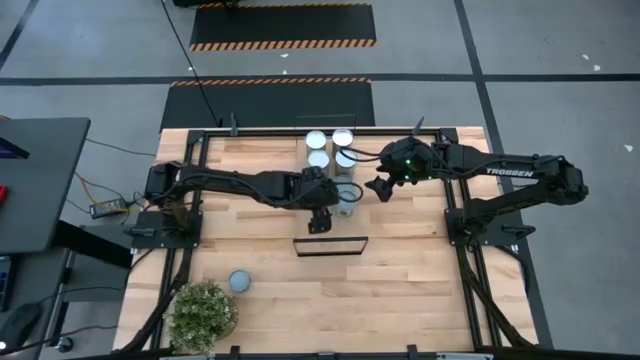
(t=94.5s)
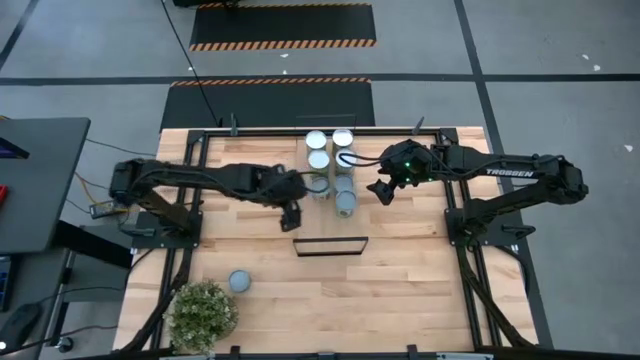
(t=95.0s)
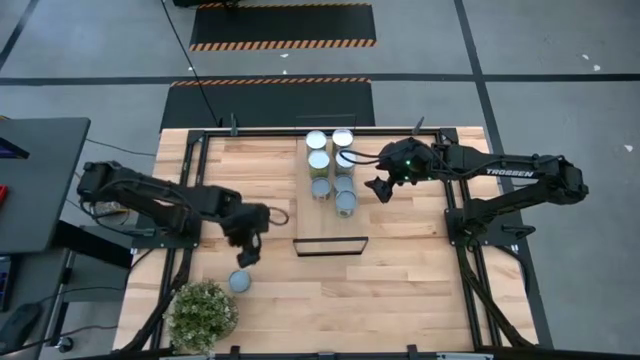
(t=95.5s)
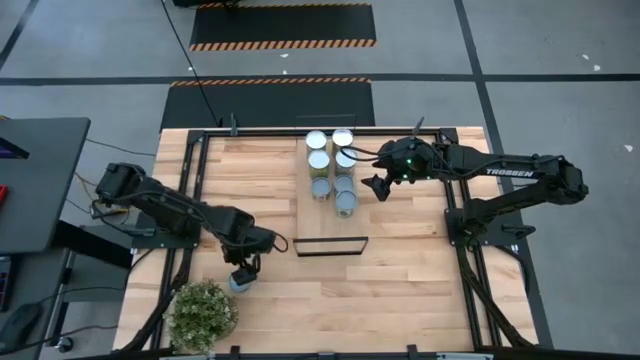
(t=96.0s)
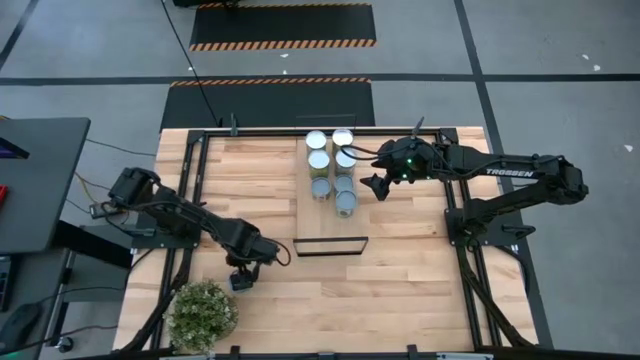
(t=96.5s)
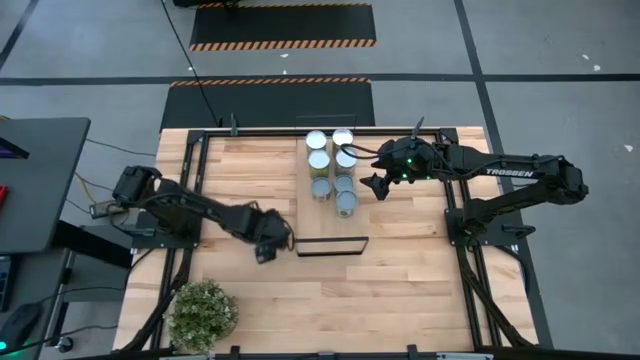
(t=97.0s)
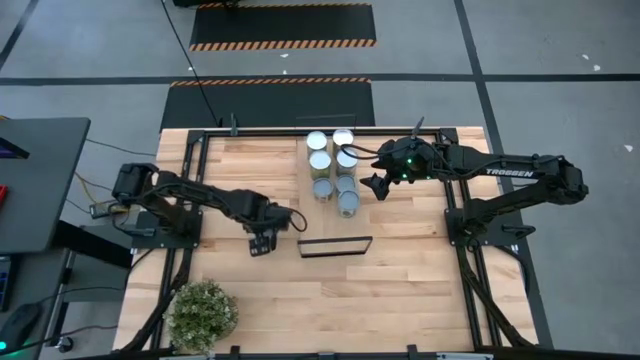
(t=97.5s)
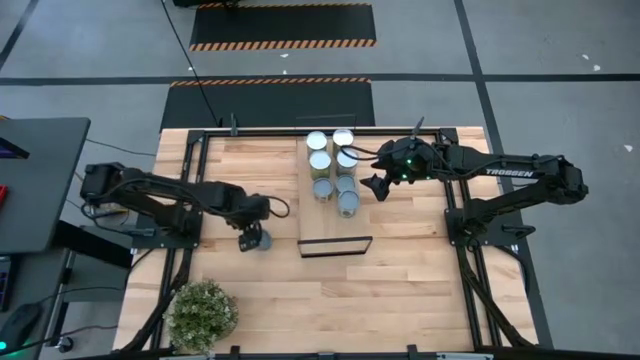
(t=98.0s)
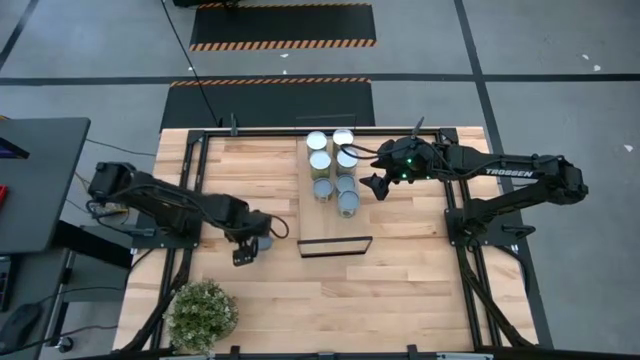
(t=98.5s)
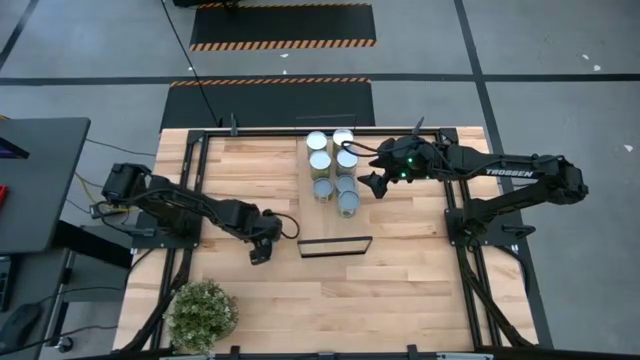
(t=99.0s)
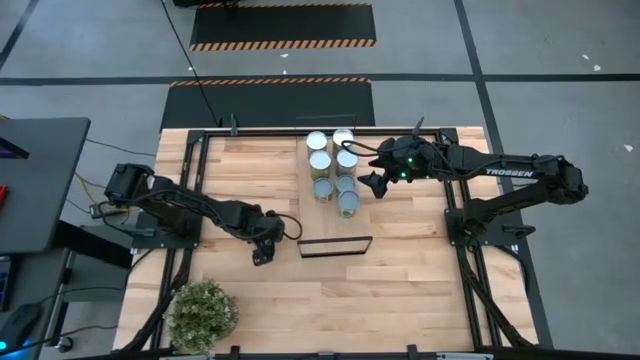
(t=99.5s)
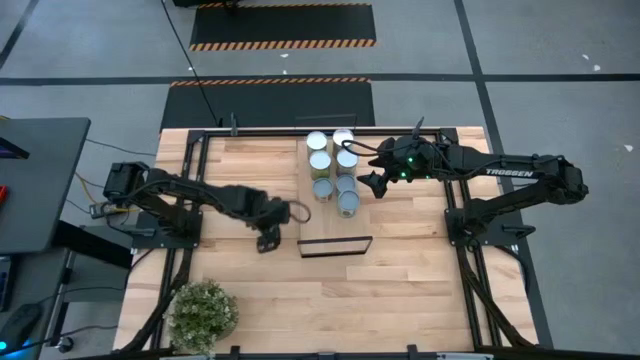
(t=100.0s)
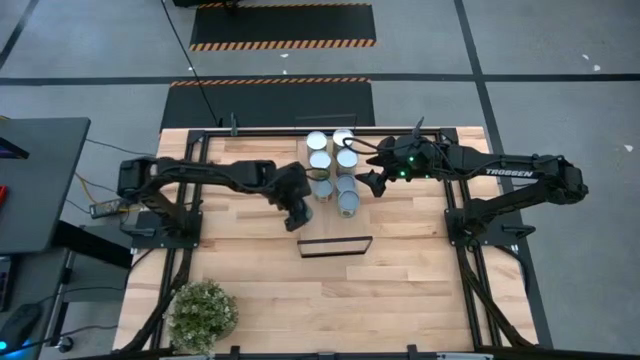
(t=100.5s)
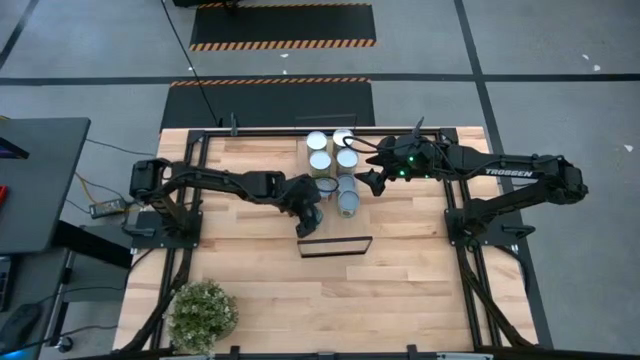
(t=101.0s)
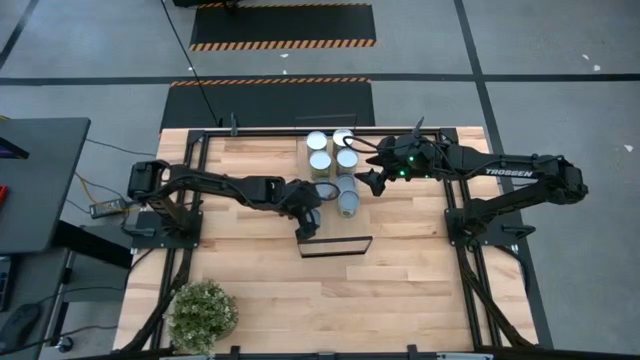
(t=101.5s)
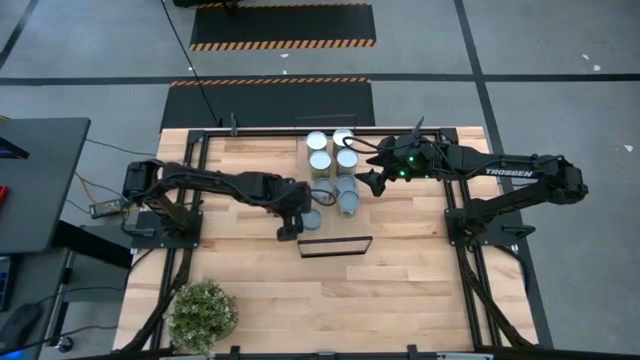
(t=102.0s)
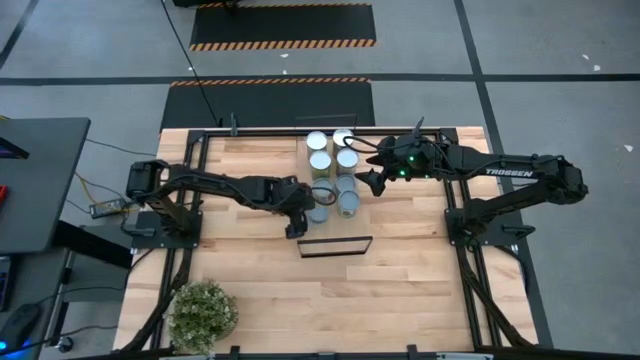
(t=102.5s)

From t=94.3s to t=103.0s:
Task: Pick and place cans onto a shelf
Put the green tuna can on the shelf

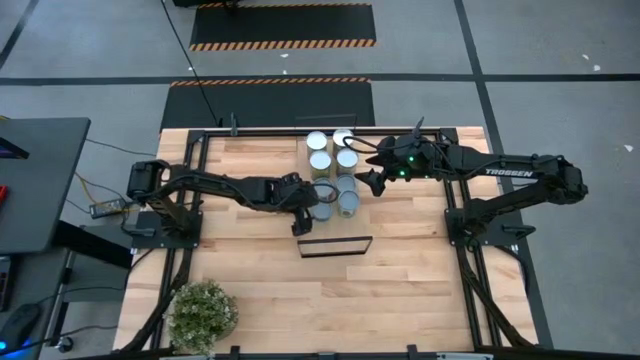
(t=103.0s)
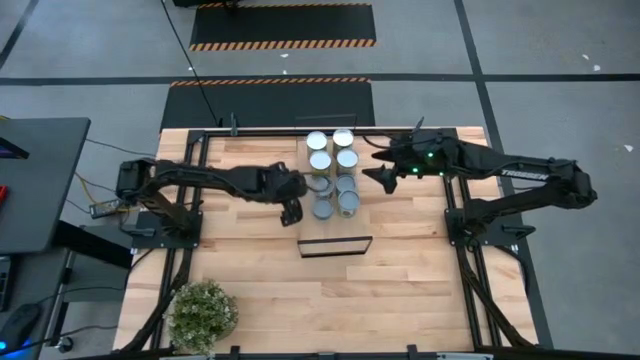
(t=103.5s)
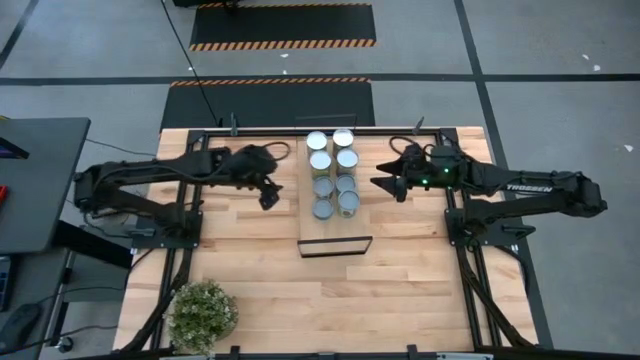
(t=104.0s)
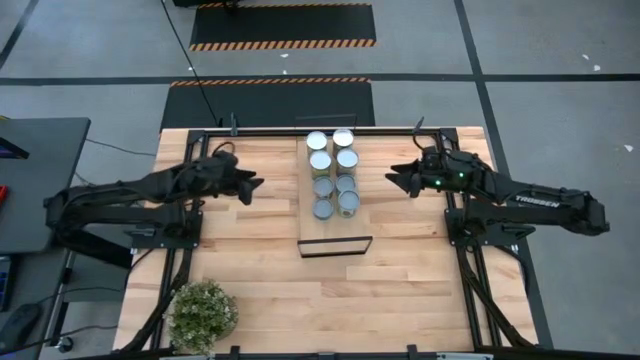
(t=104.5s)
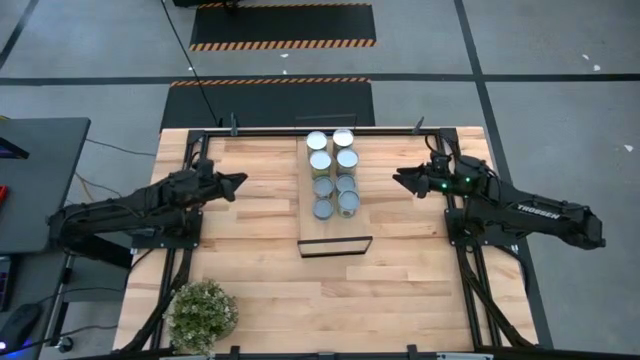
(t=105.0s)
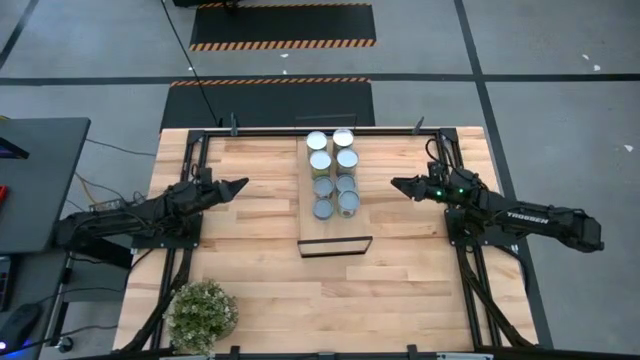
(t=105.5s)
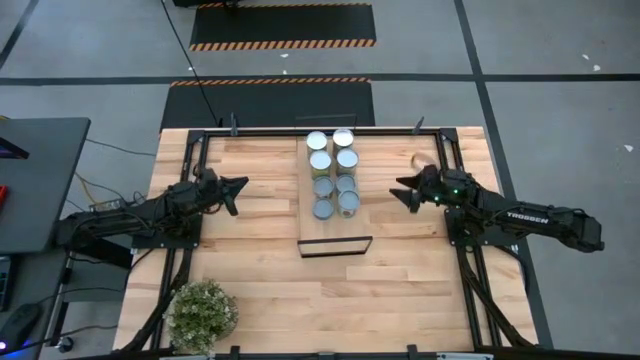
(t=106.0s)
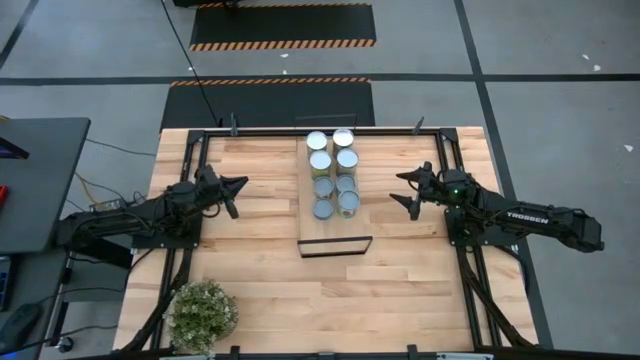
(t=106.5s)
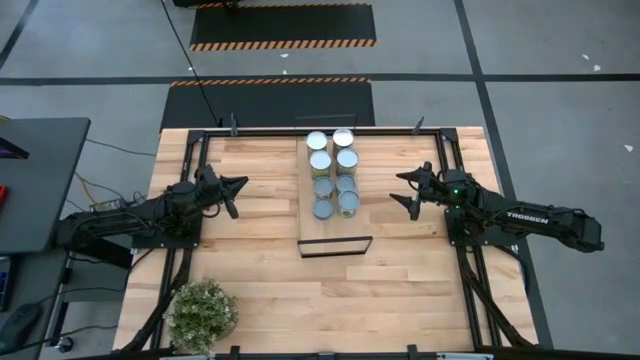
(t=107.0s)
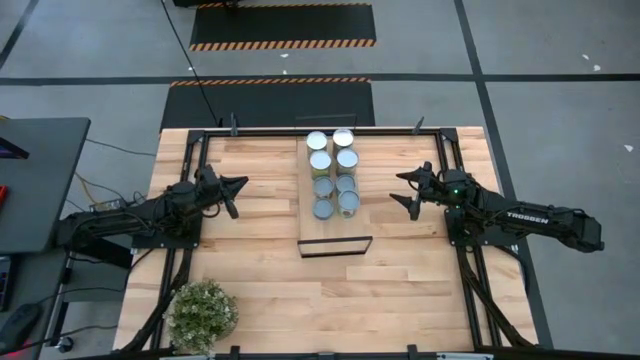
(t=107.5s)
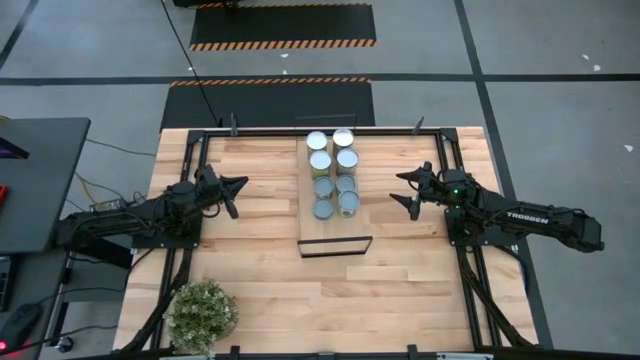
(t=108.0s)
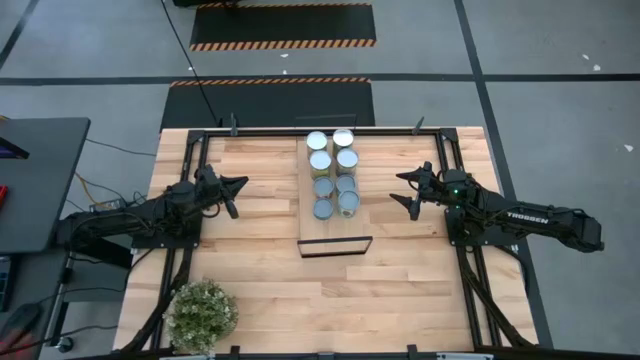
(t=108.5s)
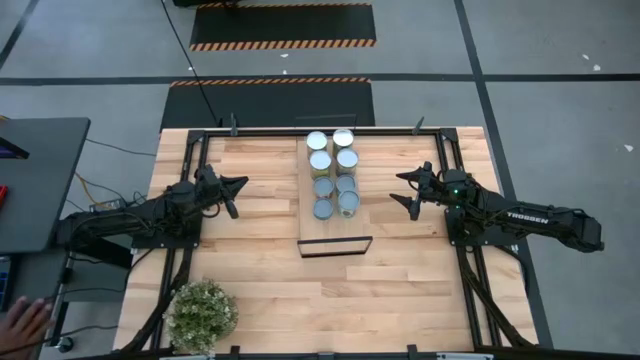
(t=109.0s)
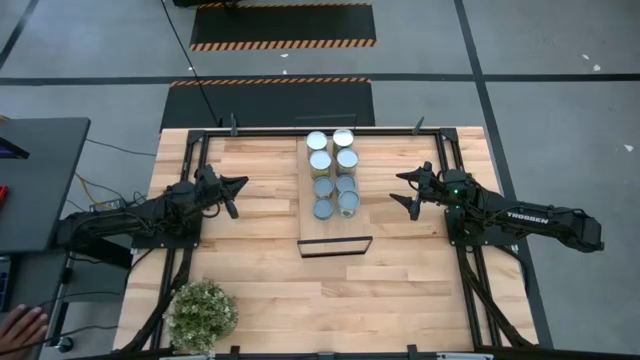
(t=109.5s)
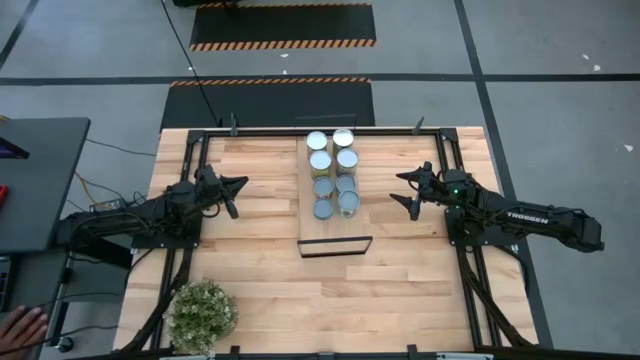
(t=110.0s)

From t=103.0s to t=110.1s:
Return to Home Position

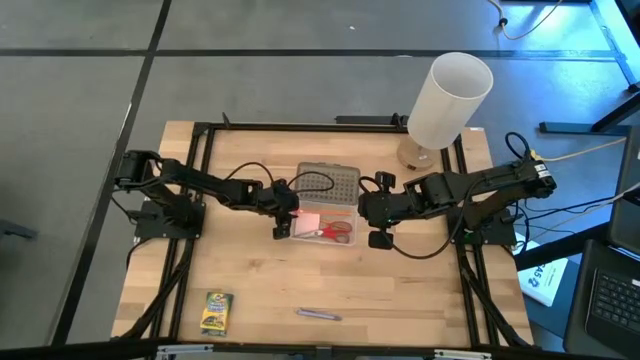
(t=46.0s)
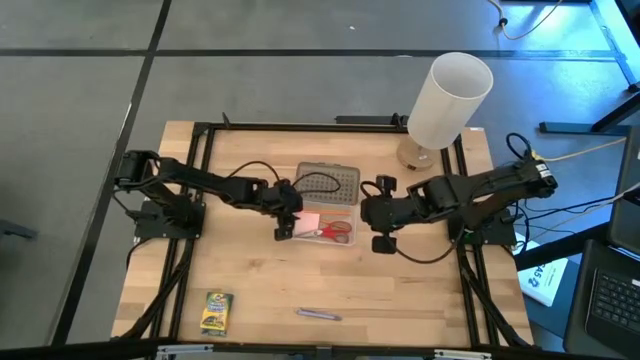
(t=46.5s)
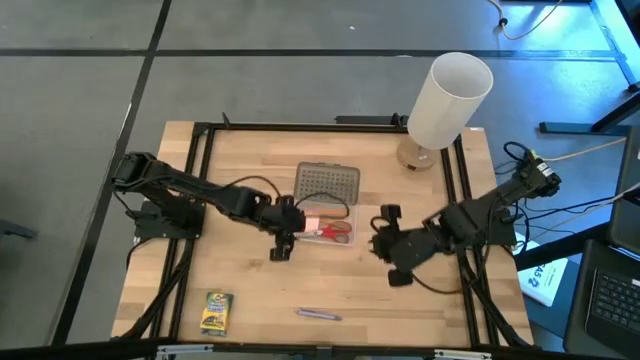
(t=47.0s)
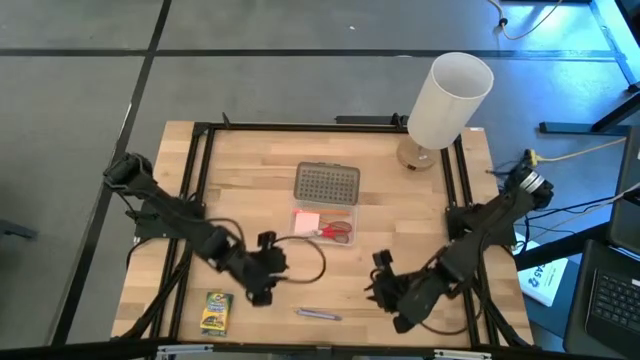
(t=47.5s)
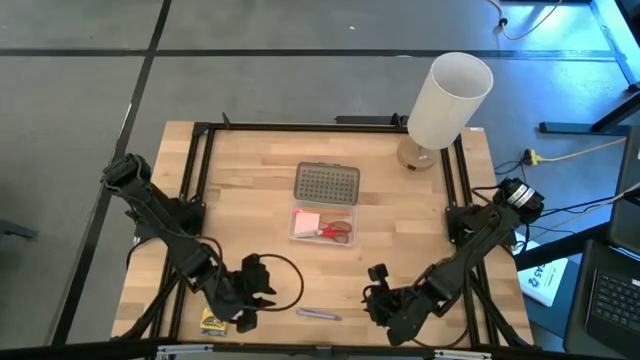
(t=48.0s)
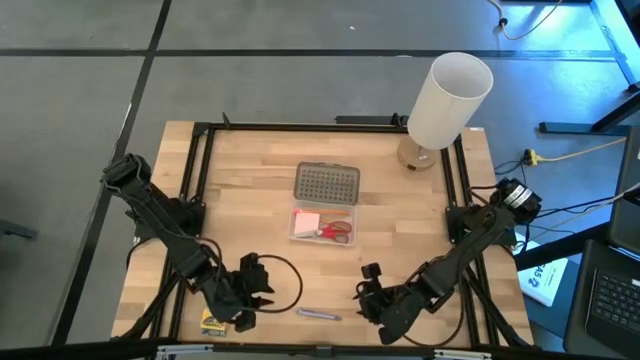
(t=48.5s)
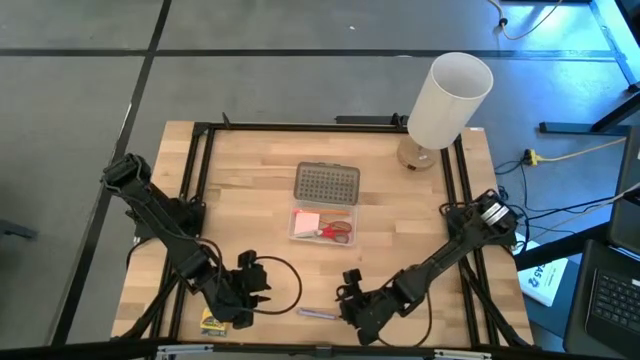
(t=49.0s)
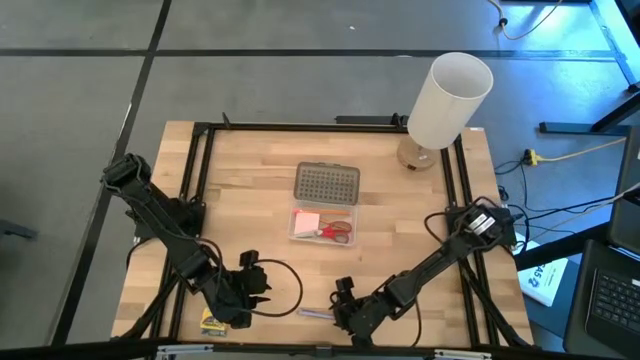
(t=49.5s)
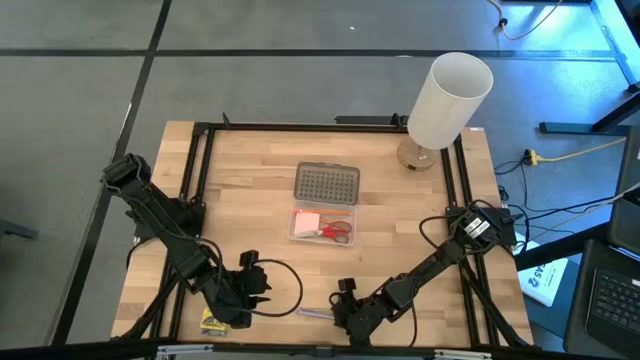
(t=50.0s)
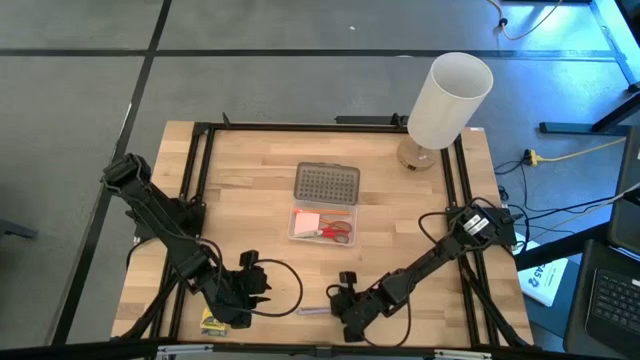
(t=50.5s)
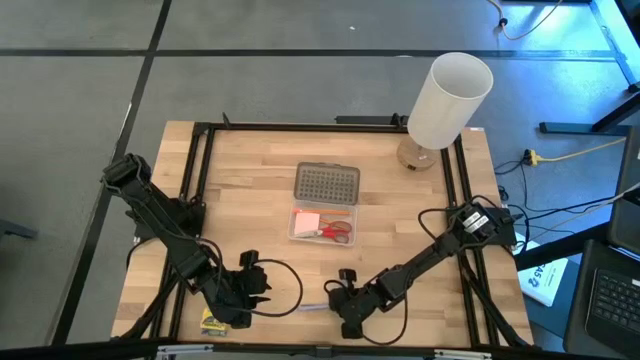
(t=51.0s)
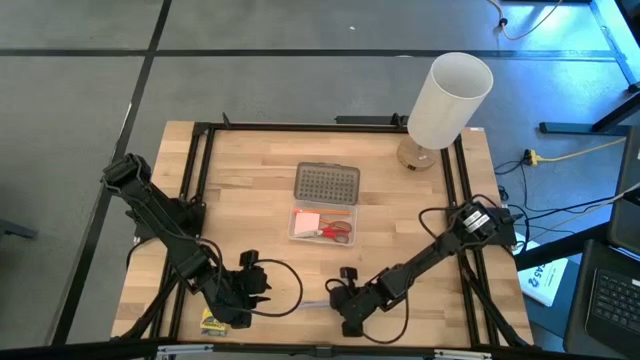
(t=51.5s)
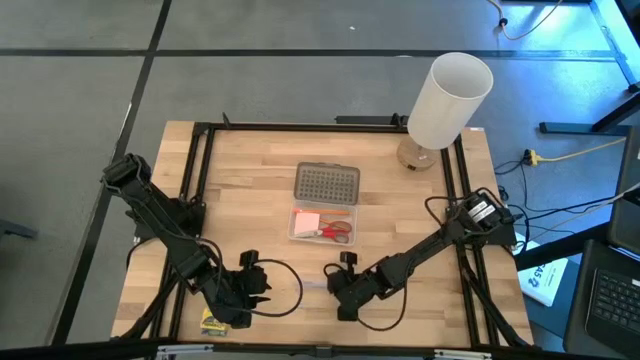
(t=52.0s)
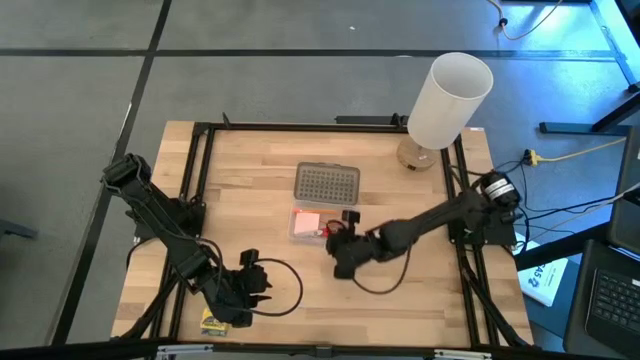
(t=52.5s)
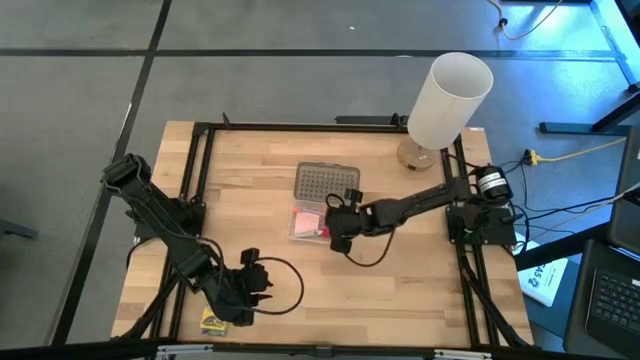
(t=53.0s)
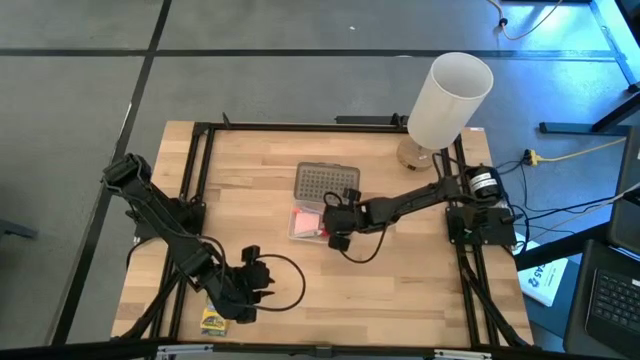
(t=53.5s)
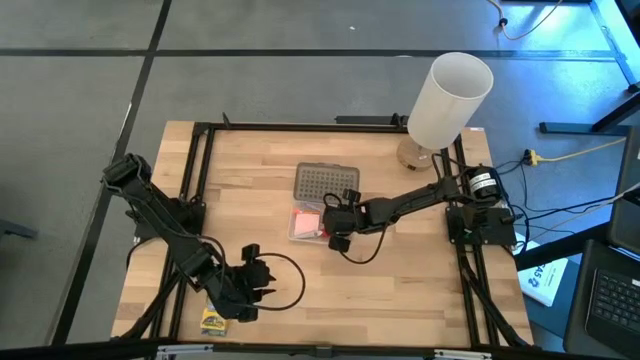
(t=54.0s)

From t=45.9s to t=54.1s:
Task: Pack school essentials
Put the white ballpen into the supply box
